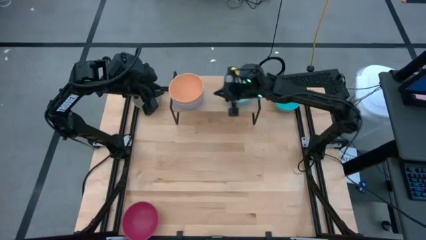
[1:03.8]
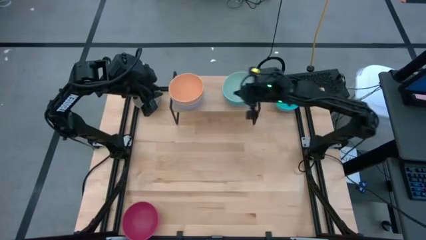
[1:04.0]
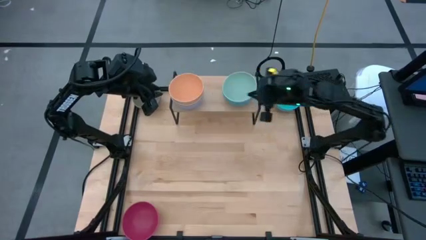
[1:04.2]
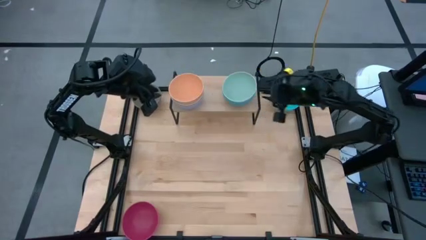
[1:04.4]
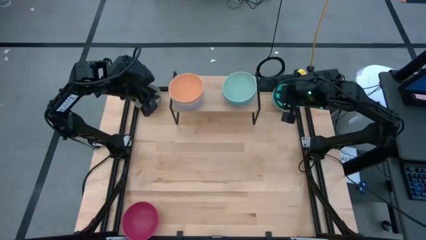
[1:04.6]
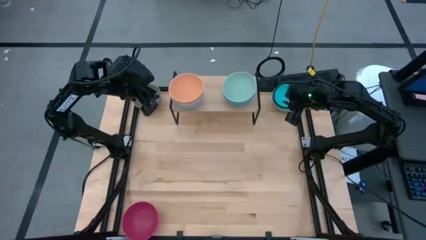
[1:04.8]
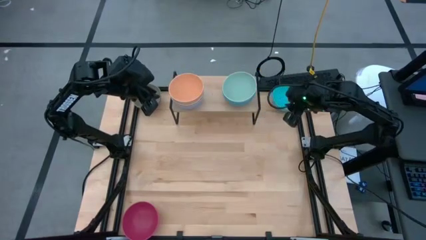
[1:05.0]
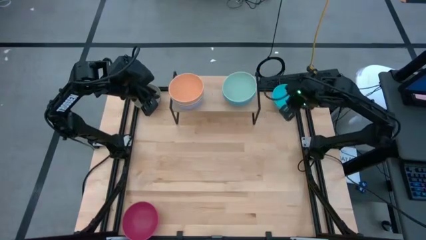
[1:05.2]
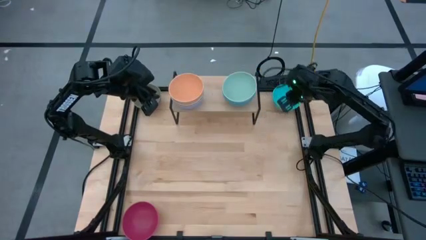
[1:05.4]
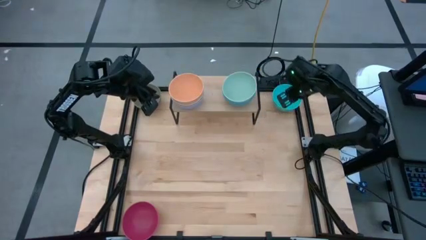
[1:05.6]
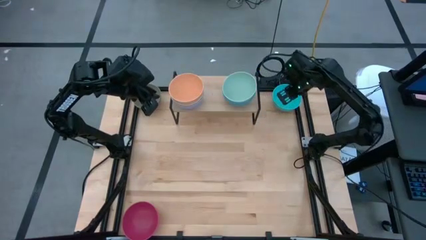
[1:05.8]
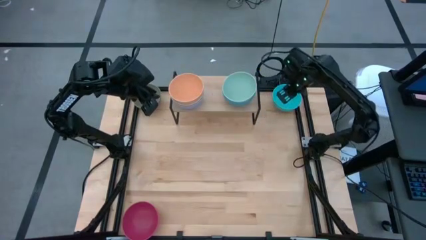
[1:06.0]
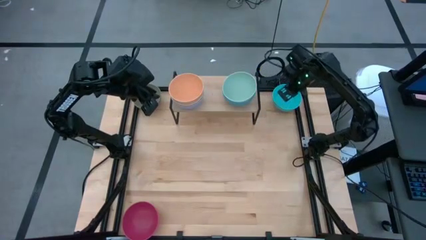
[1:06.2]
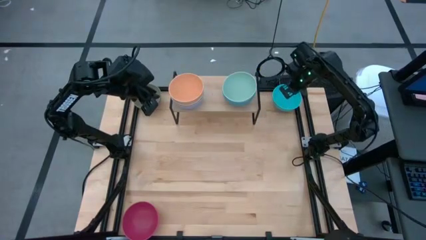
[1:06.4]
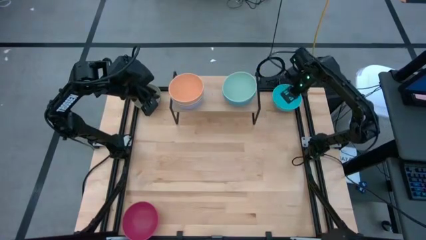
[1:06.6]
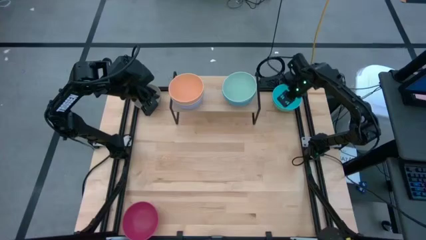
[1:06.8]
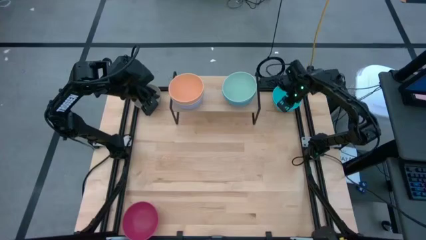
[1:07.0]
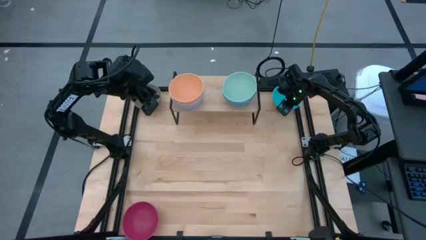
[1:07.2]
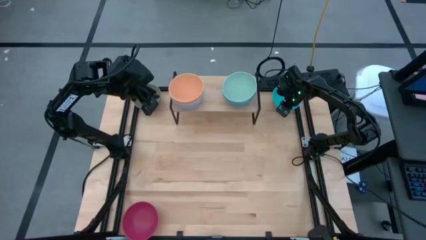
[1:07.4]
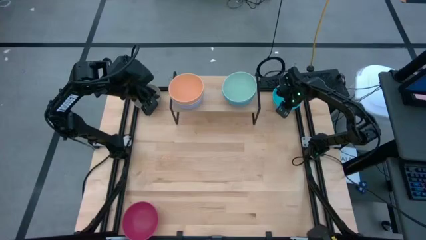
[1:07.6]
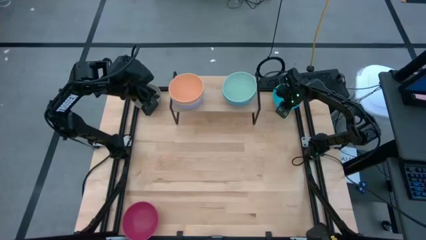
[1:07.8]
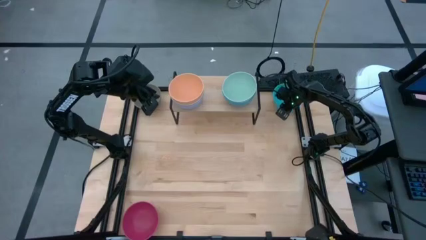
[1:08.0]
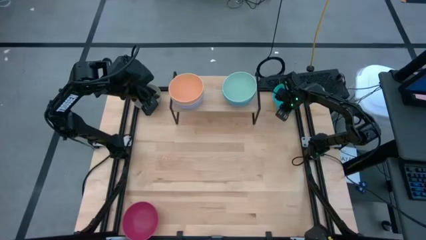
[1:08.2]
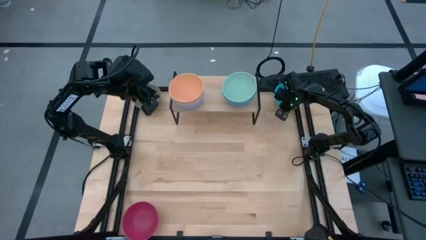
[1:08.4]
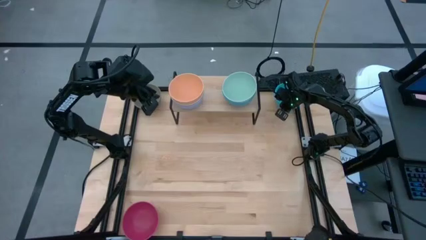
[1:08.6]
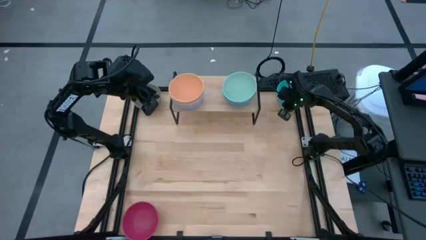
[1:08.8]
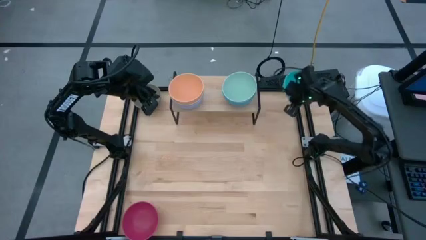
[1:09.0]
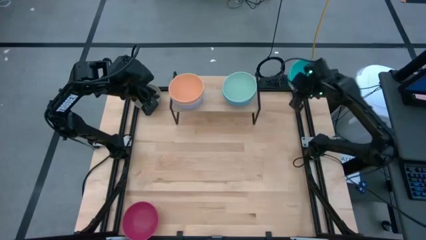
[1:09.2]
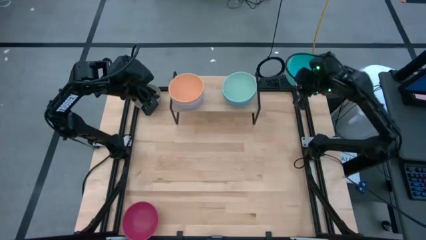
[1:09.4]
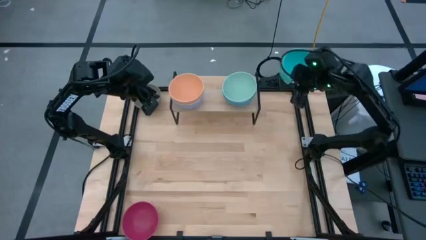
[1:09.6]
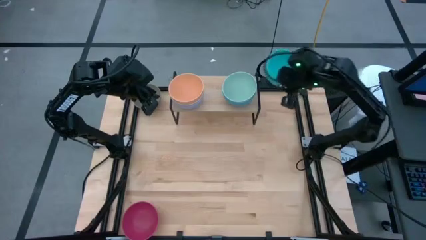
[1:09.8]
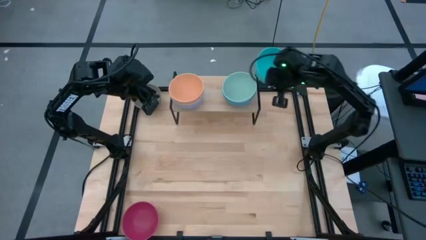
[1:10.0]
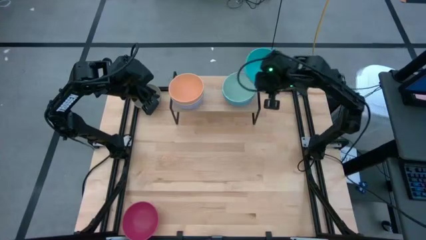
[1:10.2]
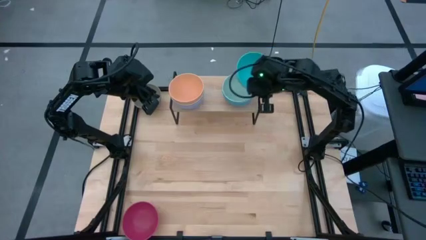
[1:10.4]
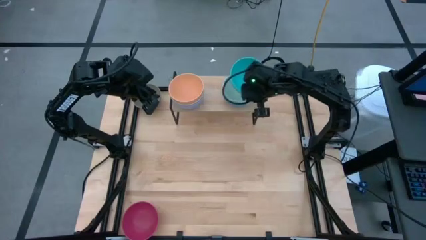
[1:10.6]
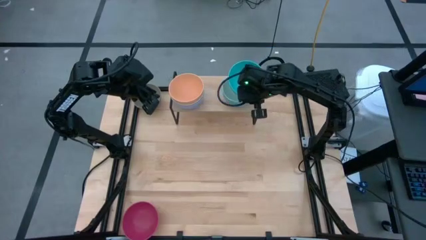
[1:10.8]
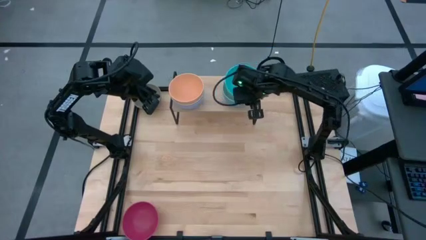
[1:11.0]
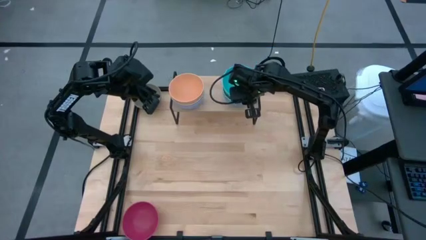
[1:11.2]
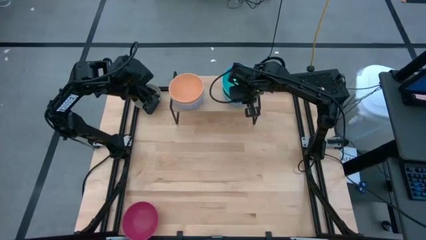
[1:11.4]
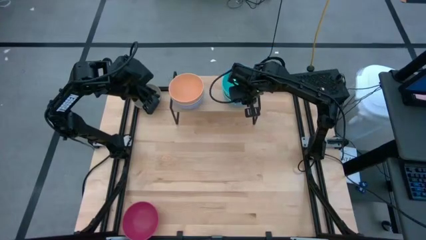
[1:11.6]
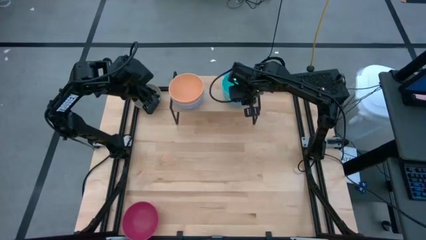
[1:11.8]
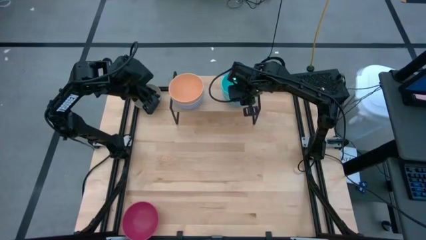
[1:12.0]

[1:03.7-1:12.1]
Task: Place and stack bowls onto a shelf
Stack the sky blue bowl on top of the light green bowl on the shelf

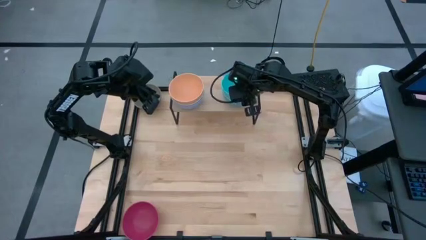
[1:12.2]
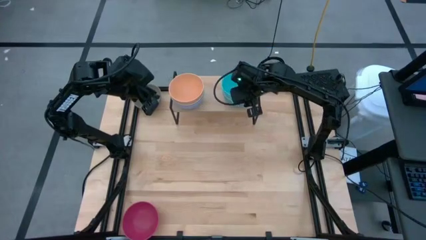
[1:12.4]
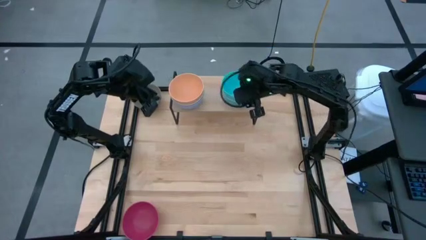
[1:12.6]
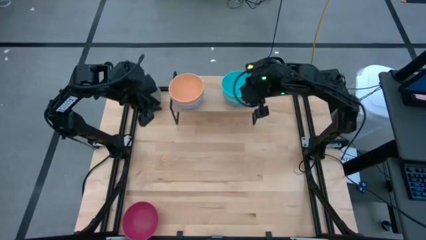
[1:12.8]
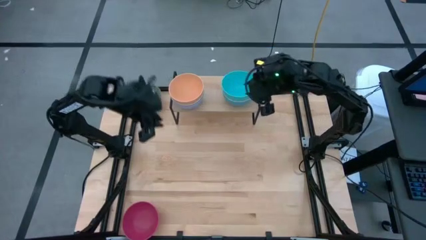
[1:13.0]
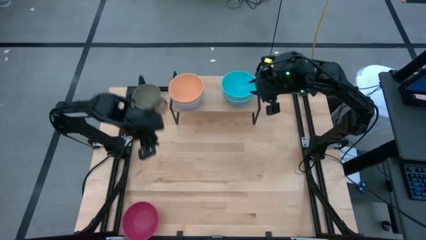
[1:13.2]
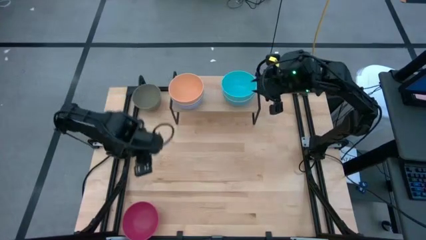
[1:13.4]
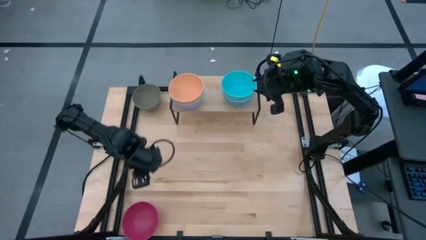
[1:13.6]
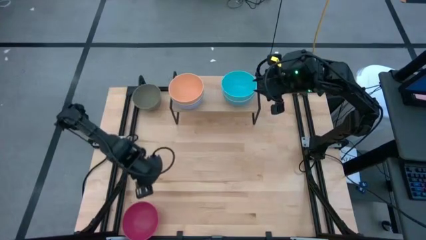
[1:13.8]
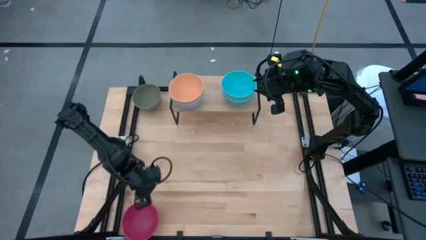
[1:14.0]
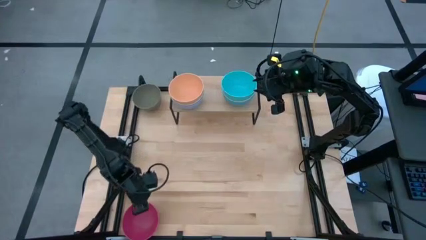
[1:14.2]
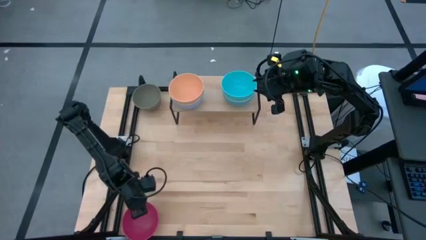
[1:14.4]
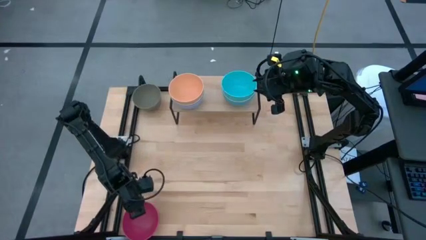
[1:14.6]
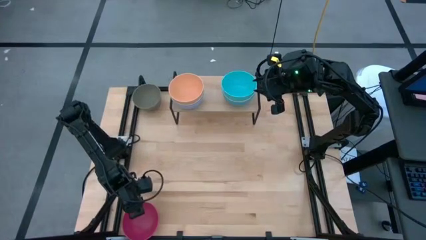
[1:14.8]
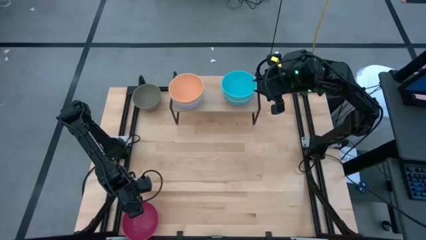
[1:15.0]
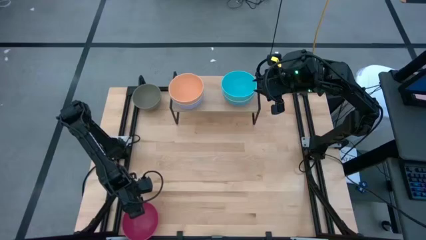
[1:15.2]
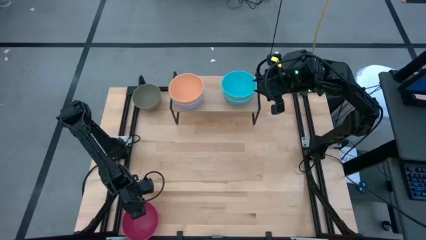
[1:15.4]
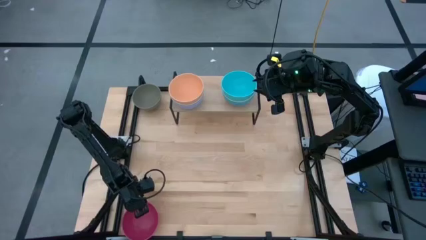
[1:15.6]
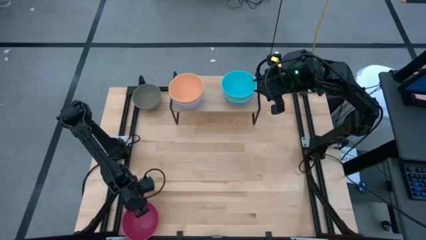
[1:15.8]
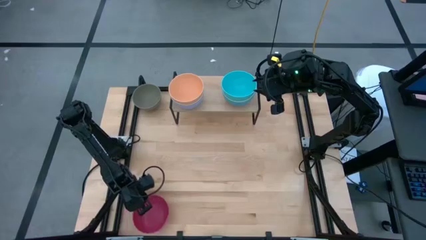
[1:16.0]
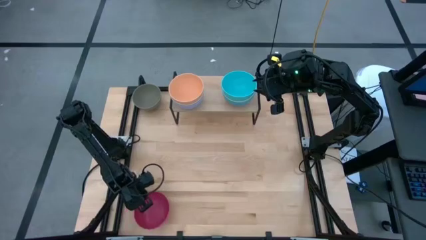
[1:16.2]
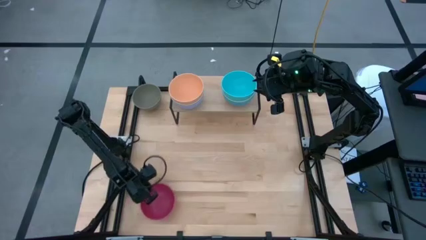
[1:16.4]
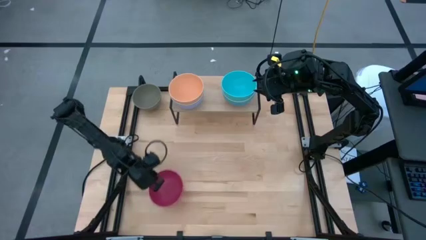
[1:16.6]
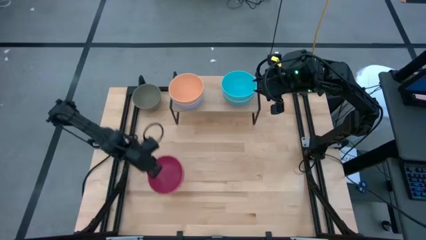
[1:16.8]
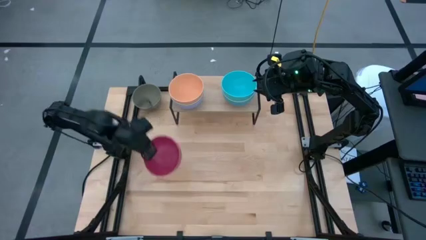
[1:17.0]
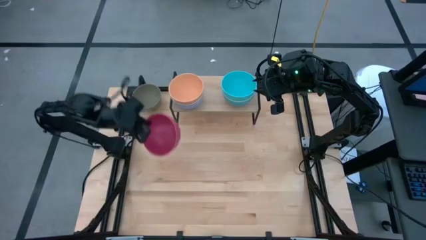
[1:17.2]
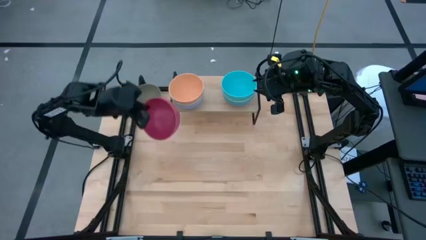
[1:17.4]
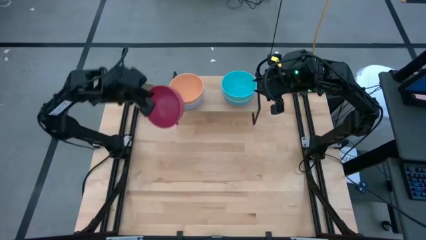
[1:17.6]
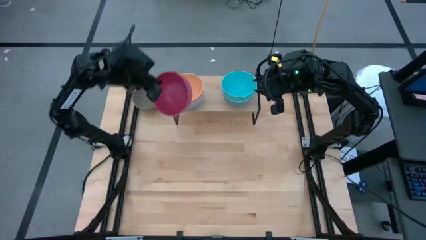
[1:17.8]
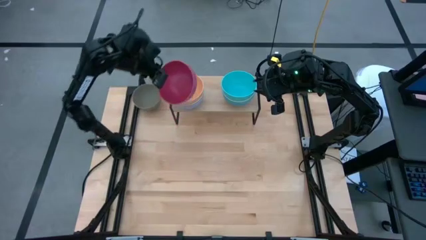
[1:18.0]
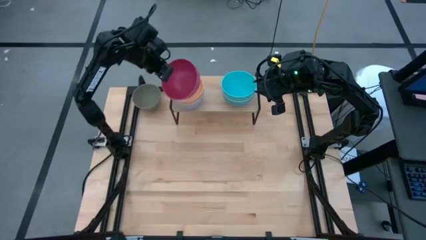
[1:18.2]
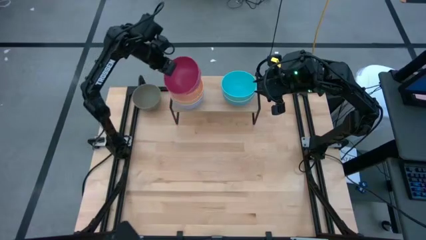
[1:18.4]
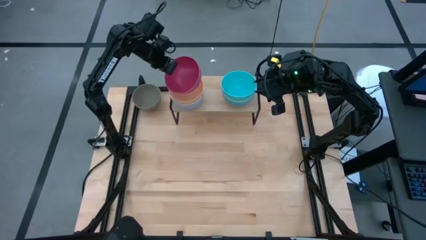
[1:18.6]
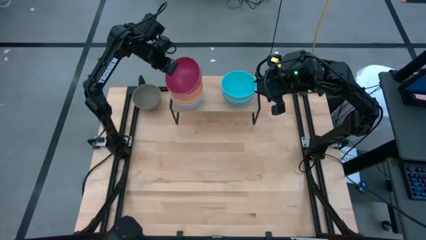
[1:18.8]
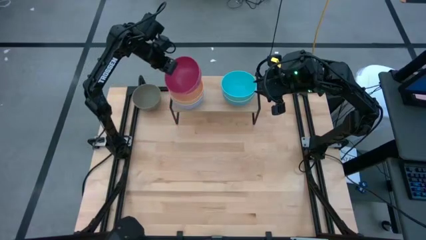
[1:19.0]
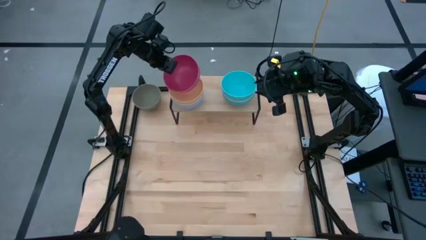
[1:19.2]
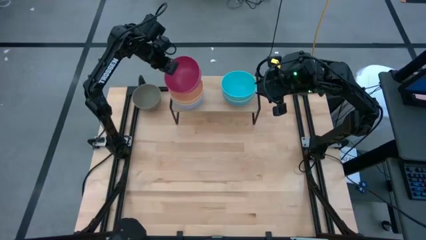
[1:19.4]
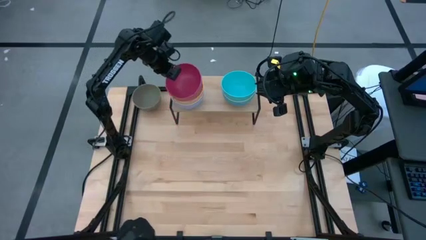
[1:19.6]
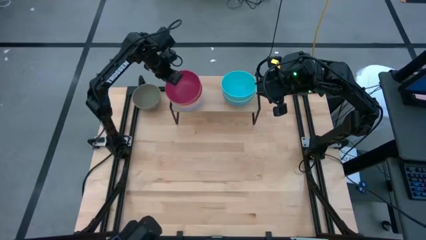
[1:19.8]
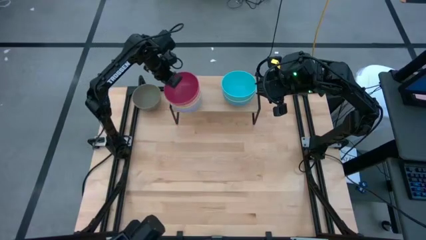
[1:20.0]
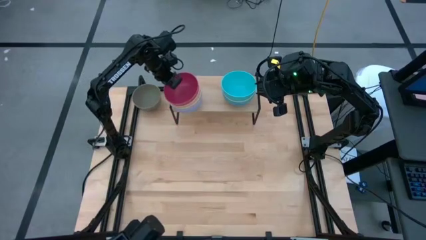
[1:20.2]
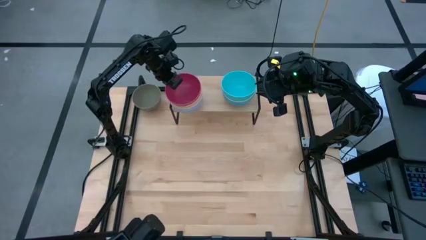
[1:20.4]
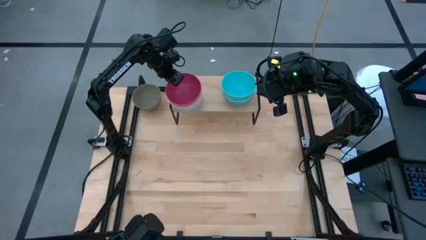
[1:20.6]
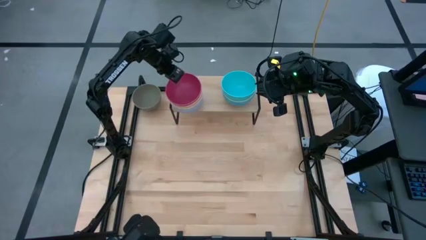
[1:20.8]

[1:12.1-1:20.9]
Stack the pink bowl on top of the orange bowl on the shelf

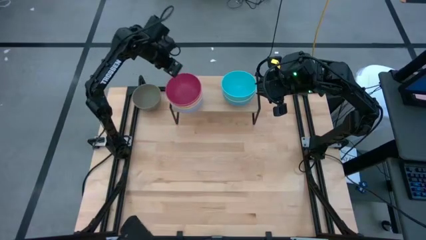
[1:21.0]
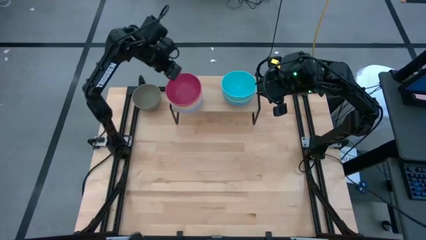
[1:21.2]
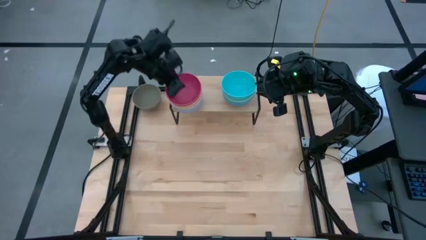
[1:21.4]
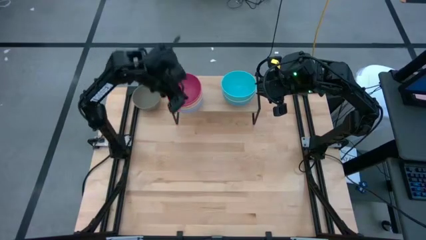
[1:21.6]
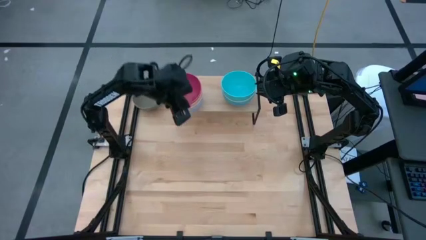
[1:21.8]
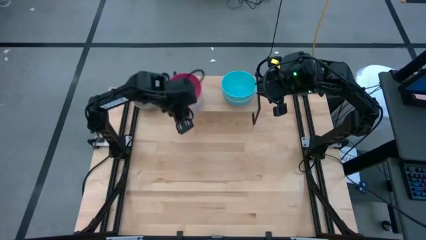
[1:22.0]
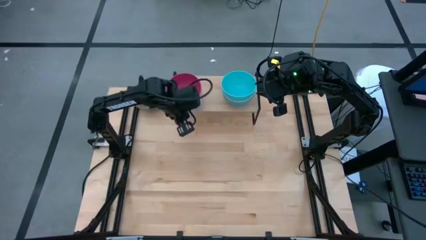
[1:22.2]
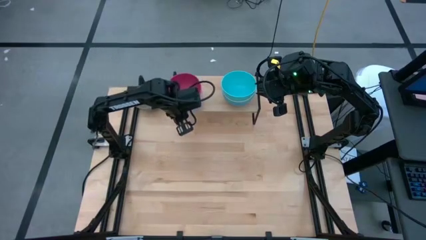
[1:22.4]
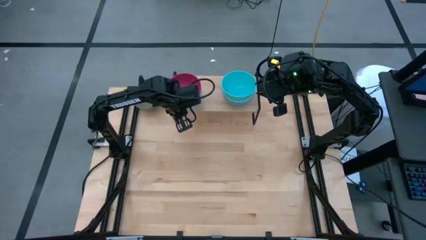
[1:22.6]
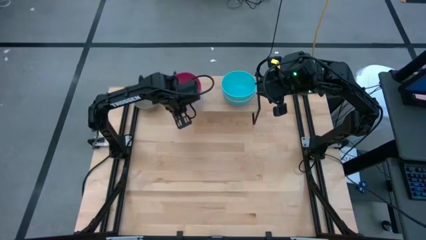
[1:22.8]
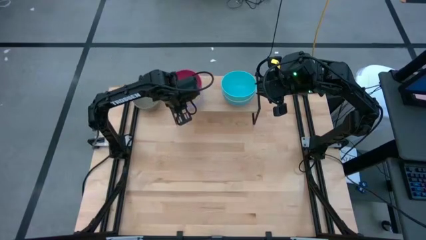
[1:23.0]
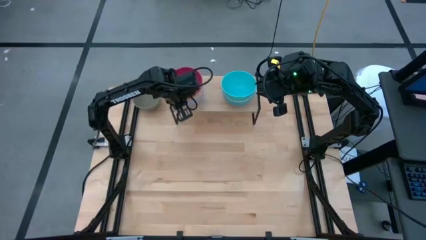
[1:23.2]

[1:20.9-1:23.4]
Adjust the left stacked bowls on the shelf
